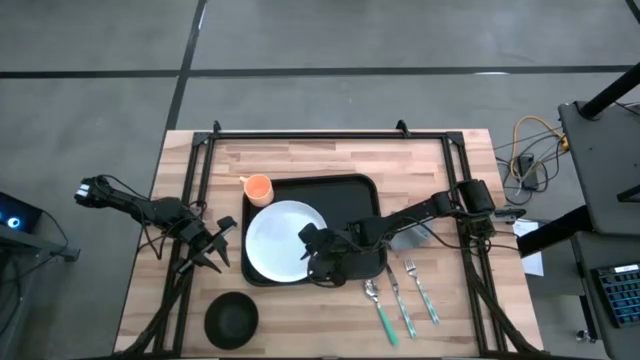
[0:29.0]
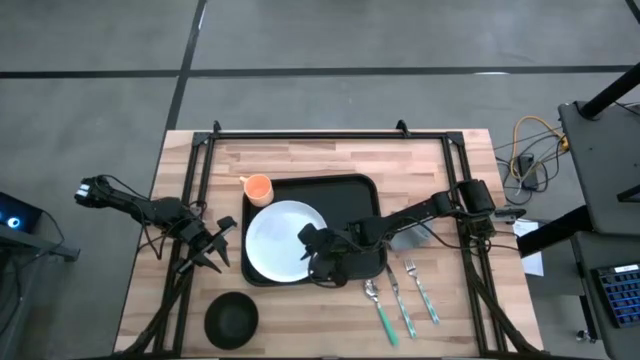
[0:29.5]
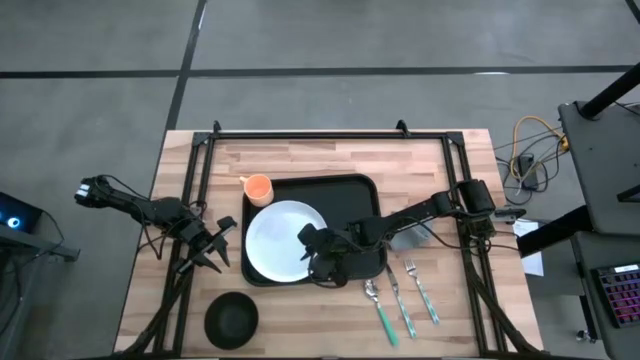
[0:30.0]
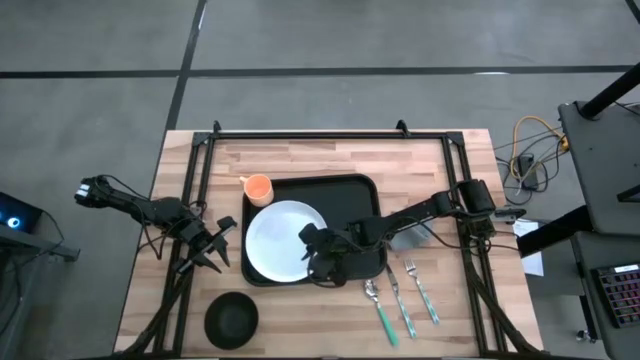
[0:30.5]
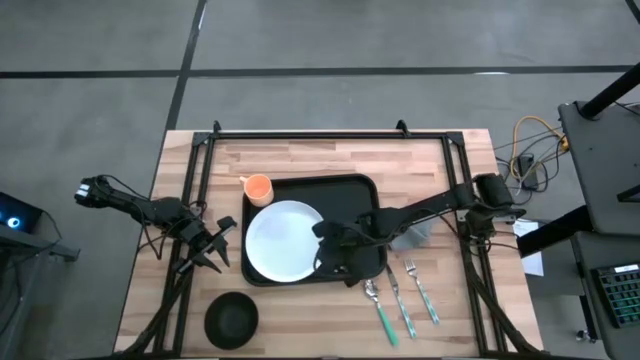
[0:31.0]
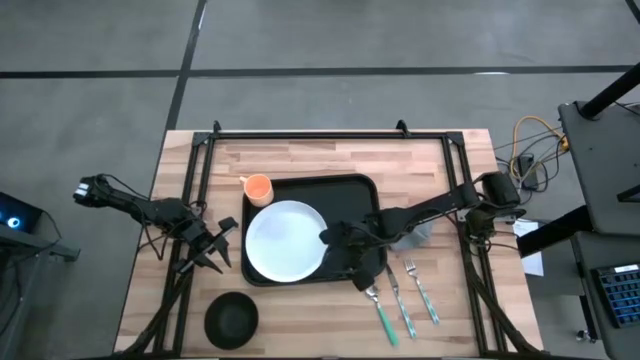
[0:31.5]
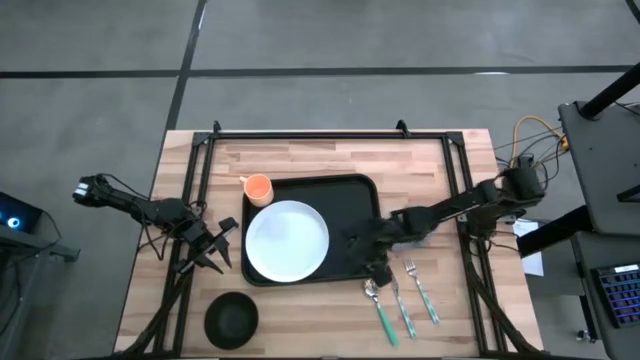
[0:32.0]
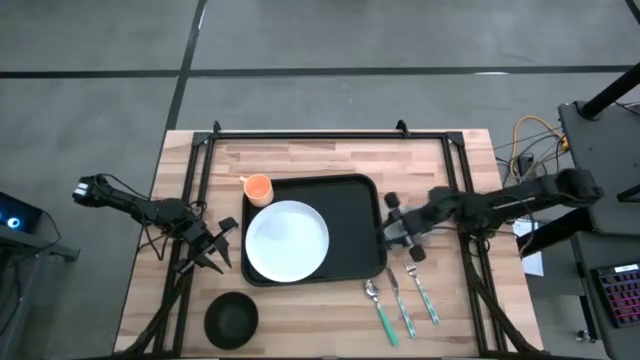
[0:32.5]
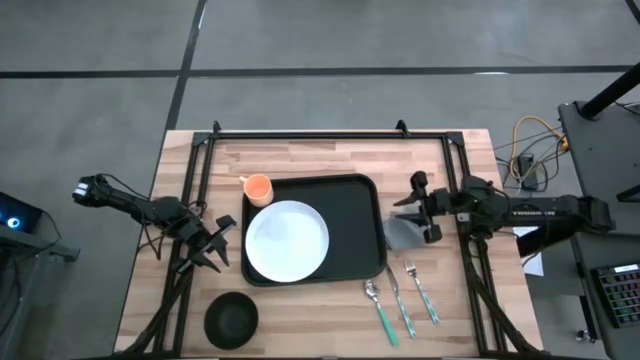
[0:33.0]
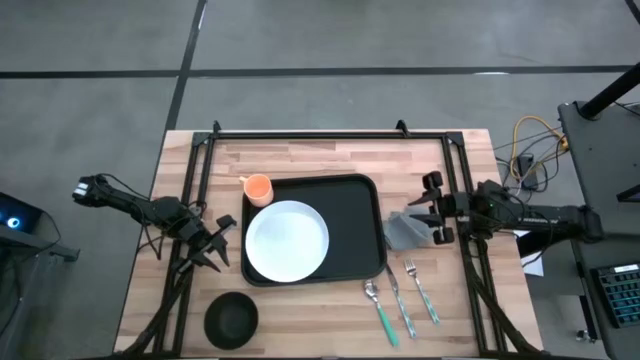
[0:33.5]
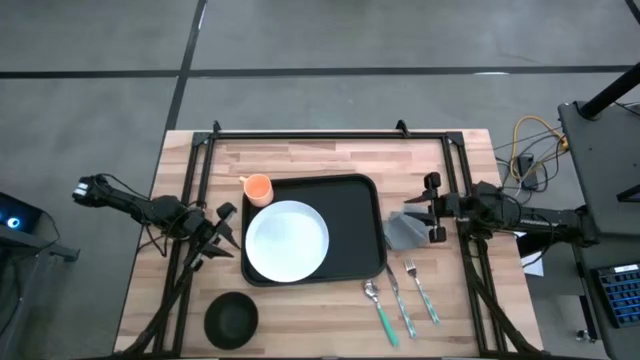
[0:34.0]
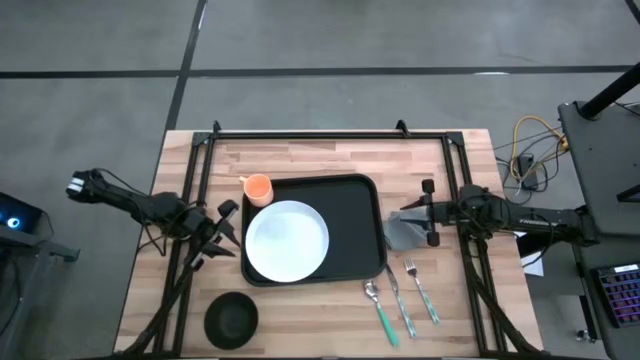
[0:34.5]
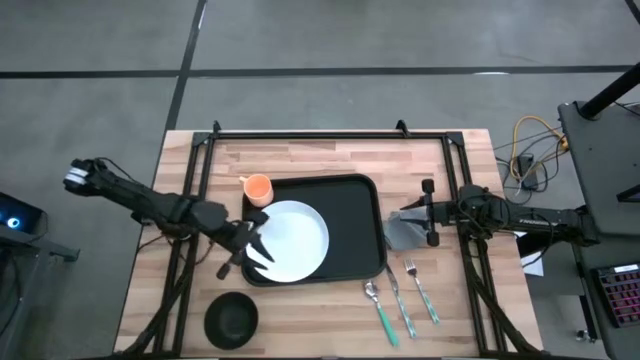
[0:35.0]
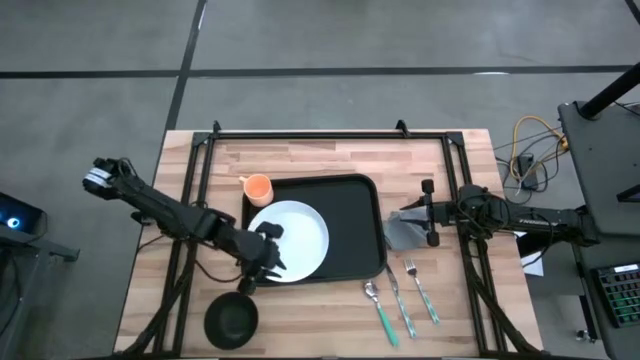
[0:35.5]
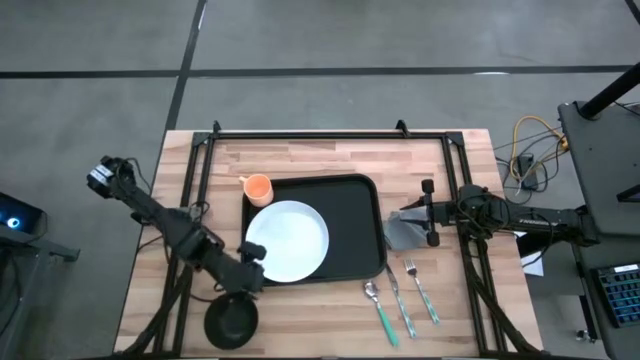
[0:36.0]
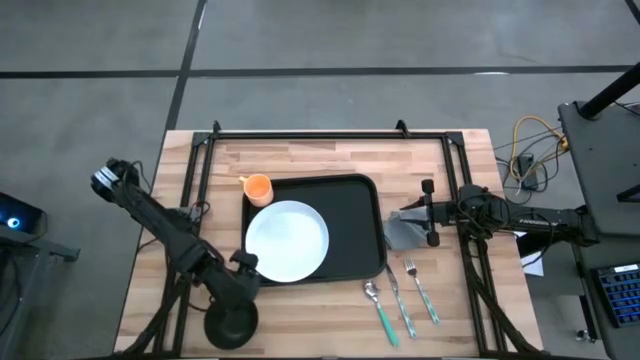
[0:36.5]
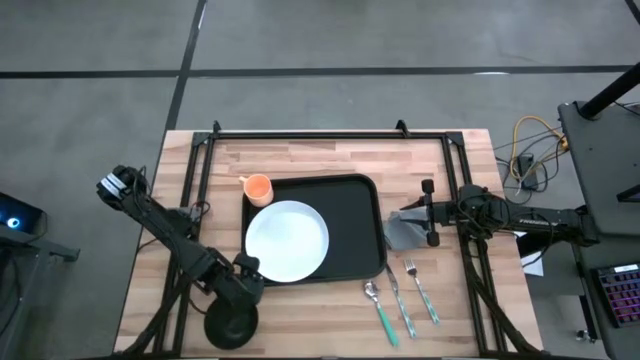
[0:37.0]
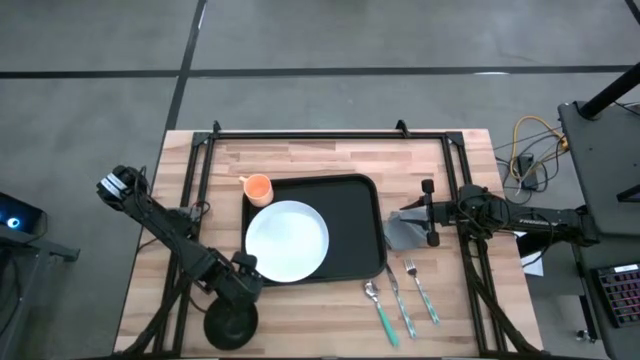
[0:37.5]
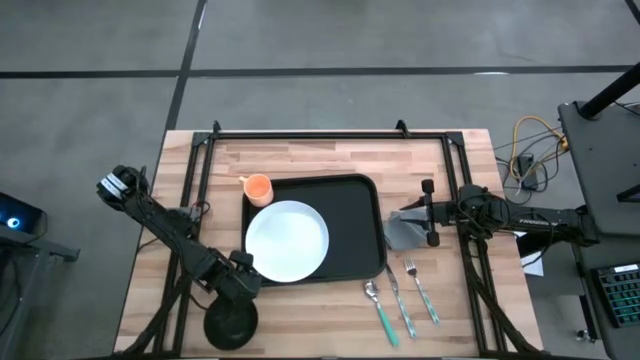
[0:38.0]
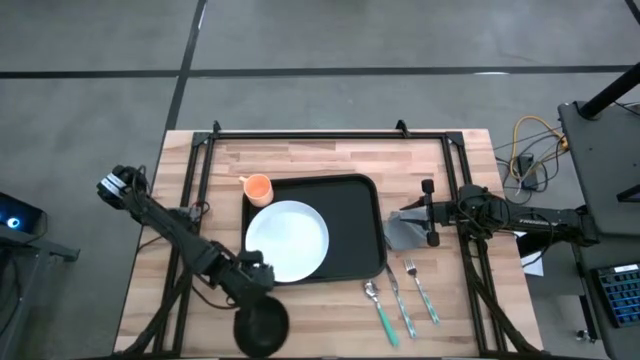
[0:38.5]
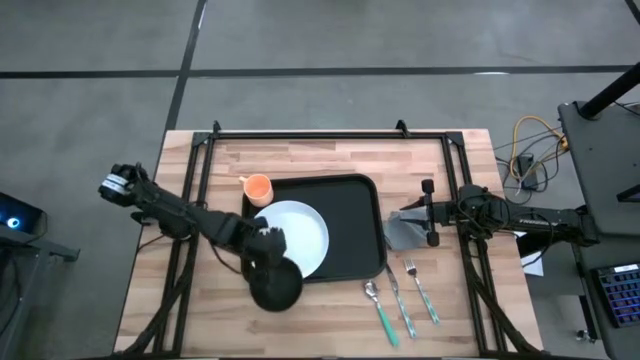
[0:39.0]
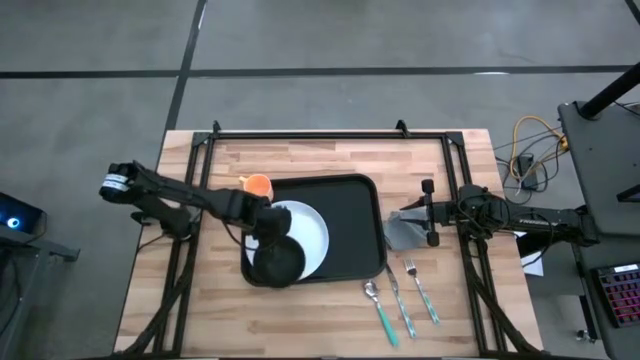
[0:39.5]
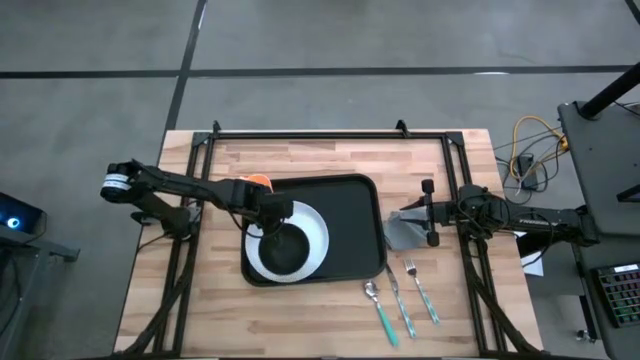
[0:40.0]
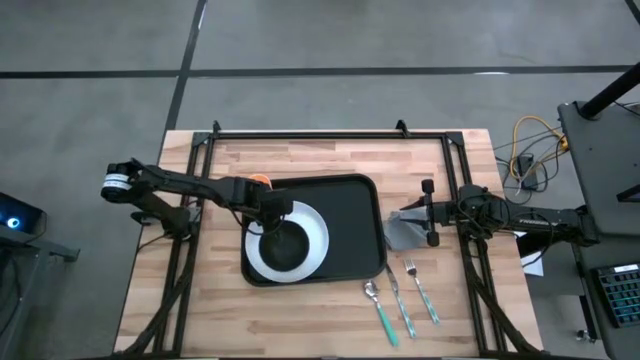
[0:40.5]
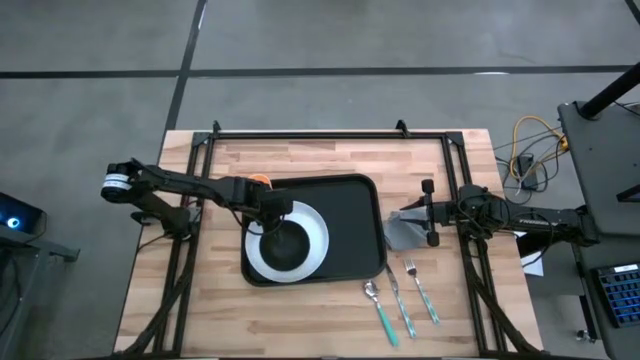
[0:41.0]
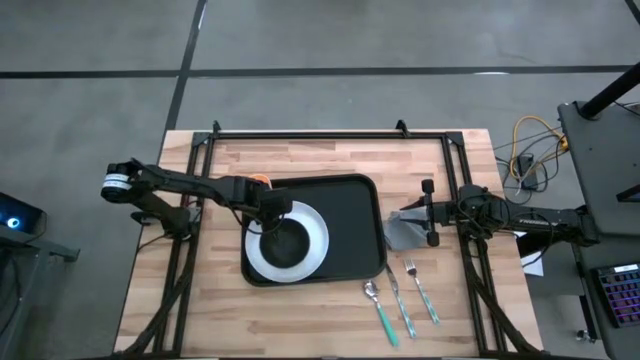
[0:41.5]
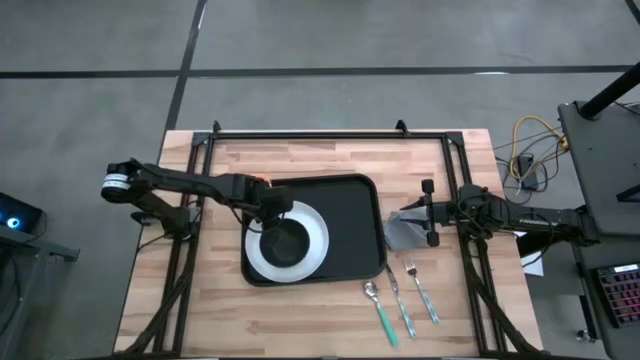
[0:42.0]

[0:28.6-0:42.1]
Task: Set up tray
Put the black bowl on the white plate

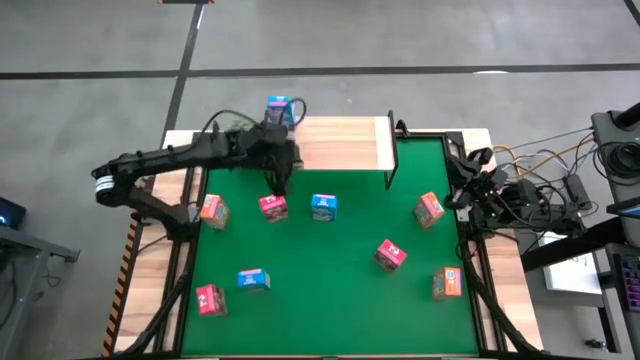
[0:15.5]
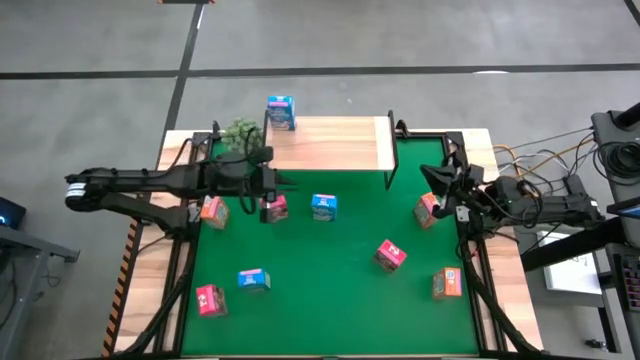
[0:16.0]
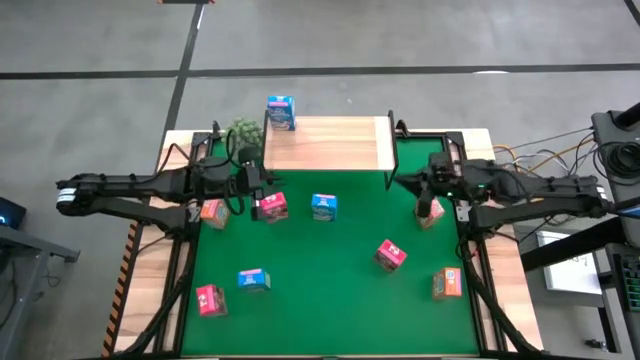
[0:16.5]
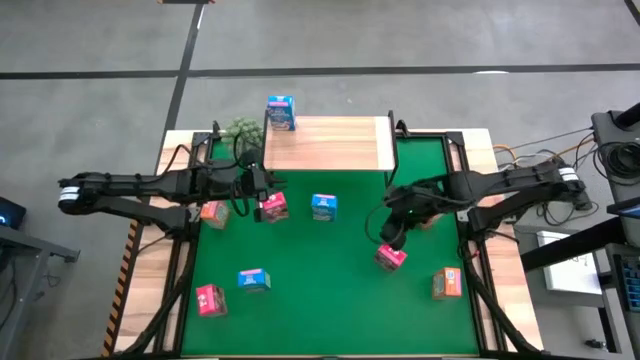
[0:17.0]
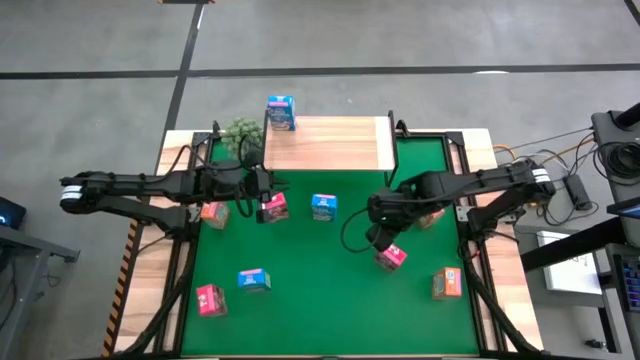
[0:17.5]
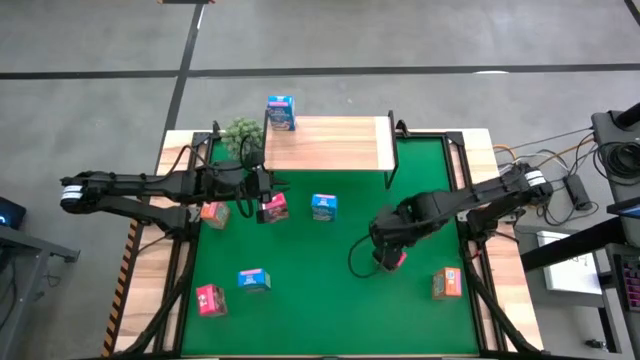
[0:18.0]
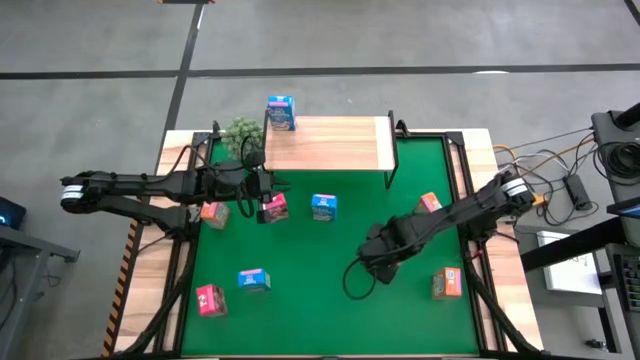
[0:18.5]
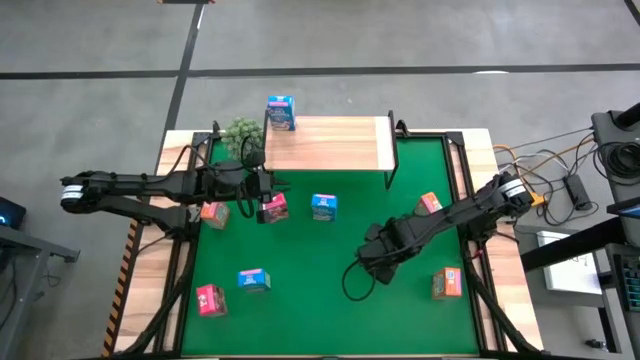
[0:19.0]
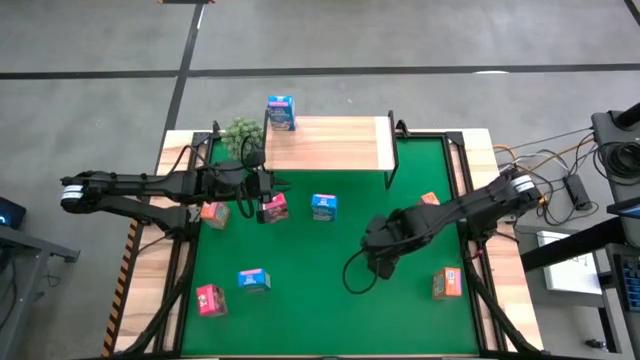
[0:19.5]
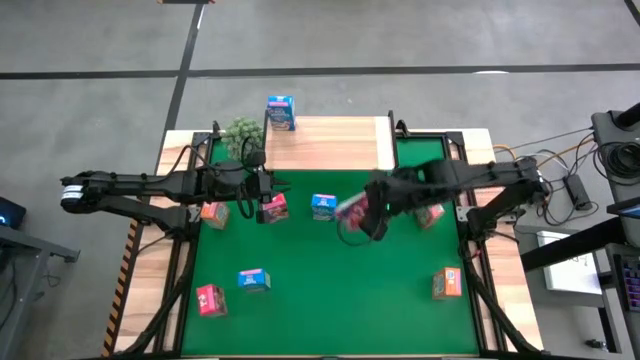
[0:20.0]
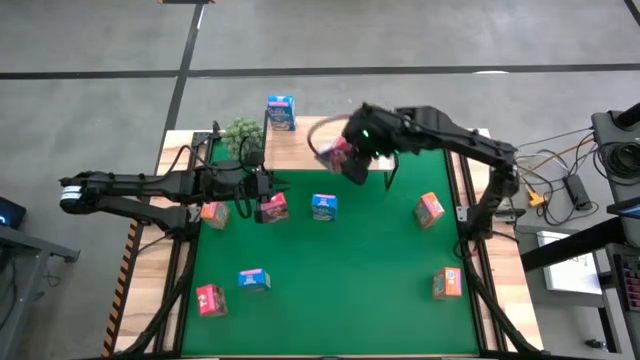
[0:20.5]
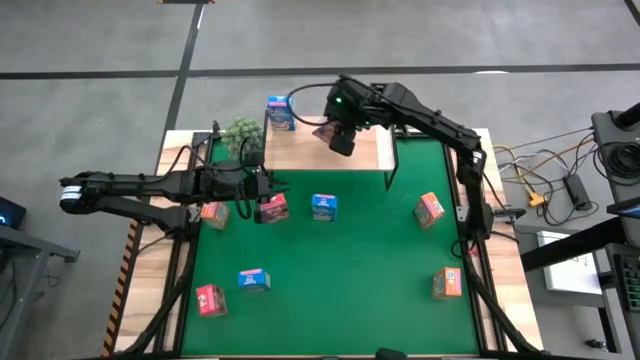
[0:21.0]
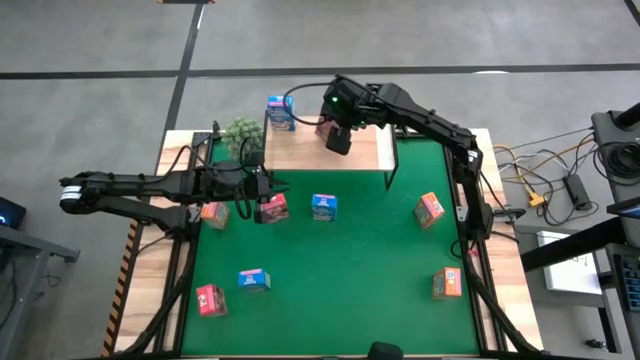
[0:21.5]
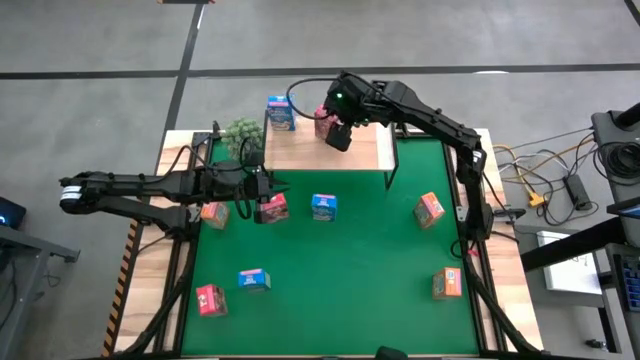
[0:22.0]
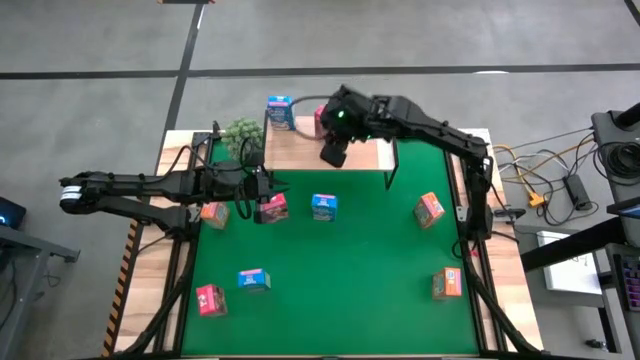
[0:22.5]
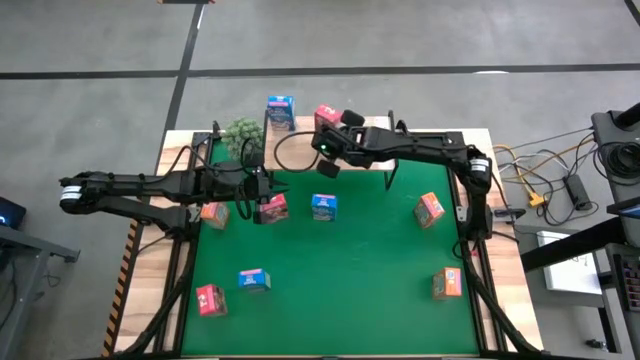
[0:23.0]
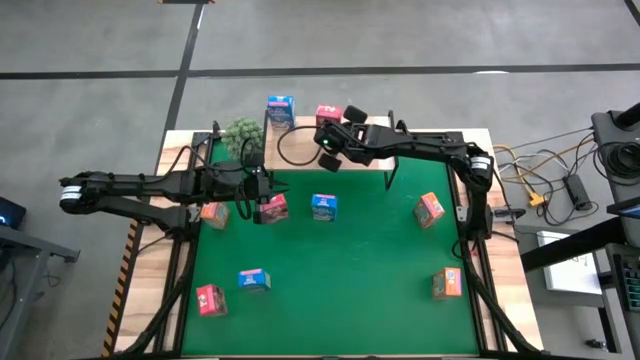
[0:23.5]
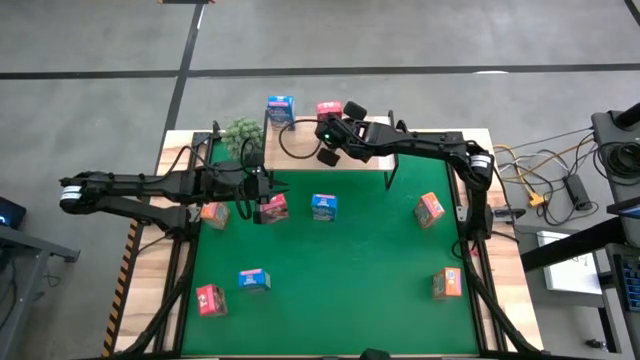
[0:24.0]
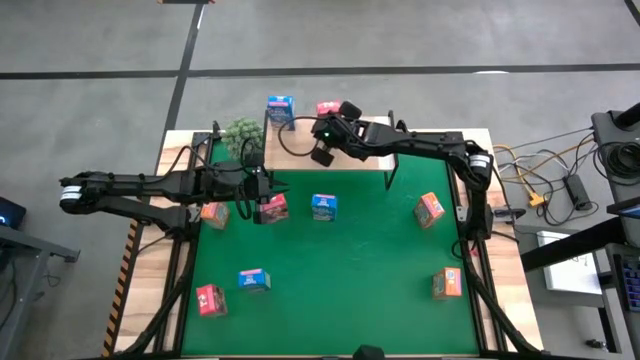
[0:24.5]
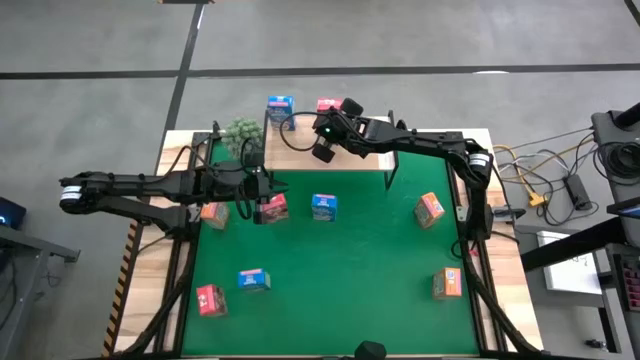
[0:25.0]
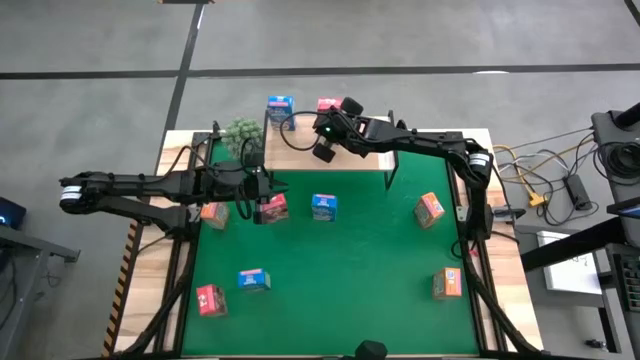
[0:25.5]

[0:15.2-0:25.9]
Task: Stack cereal on shelf
Put the left red cereal box on the shelf
